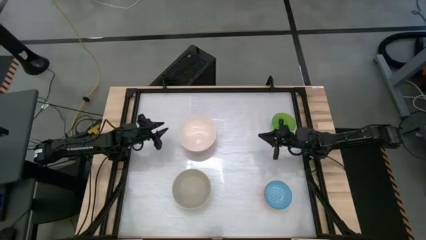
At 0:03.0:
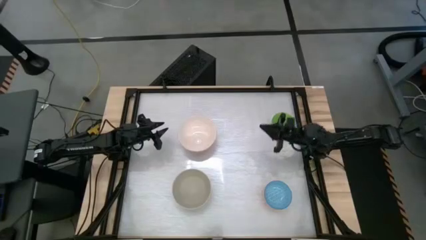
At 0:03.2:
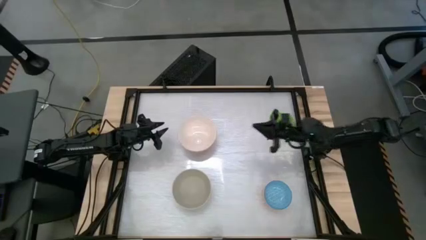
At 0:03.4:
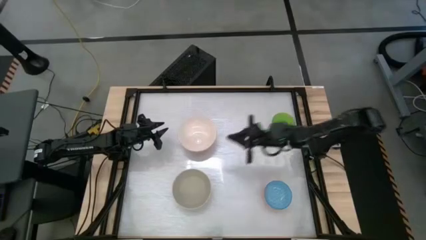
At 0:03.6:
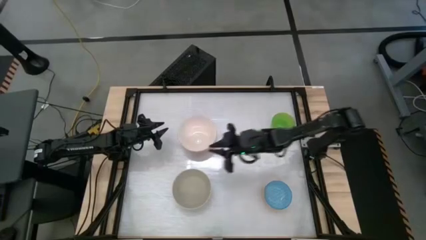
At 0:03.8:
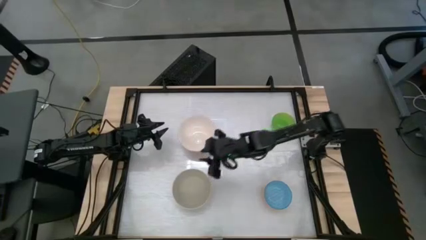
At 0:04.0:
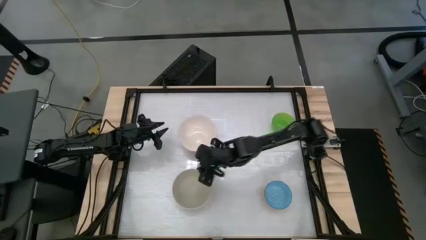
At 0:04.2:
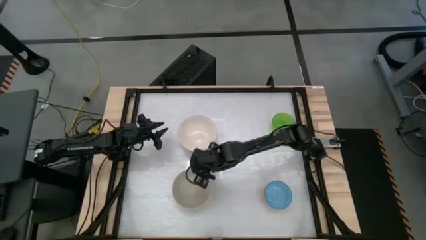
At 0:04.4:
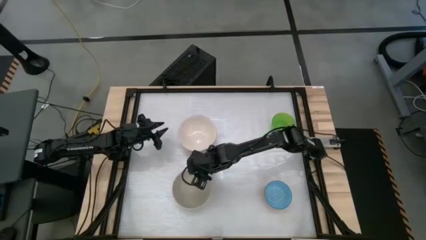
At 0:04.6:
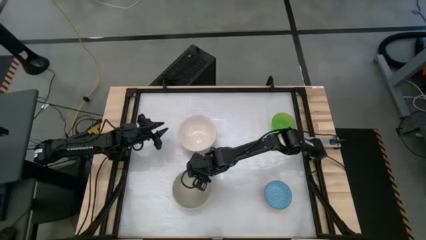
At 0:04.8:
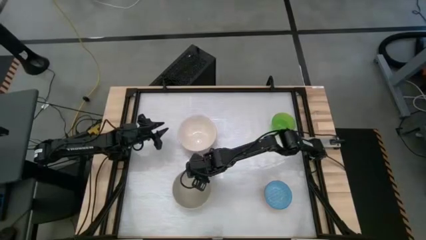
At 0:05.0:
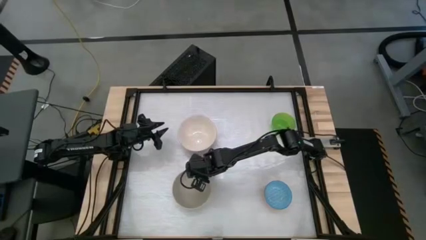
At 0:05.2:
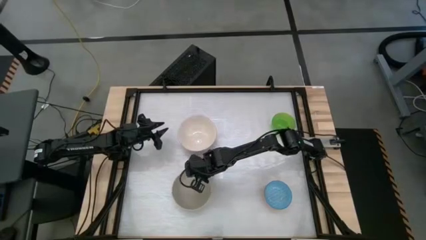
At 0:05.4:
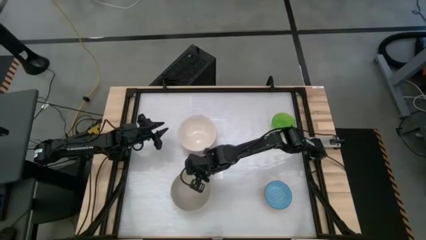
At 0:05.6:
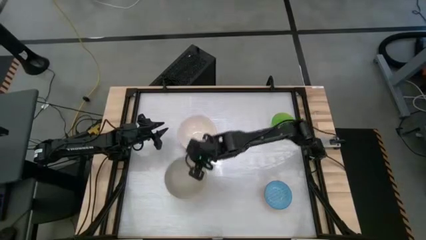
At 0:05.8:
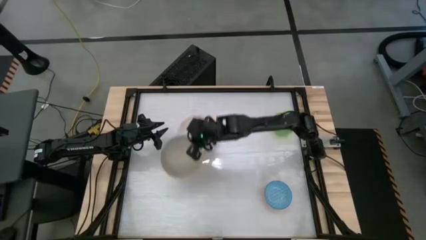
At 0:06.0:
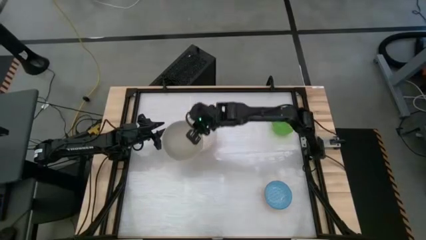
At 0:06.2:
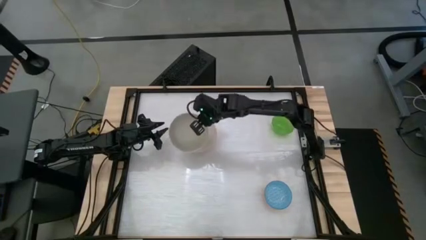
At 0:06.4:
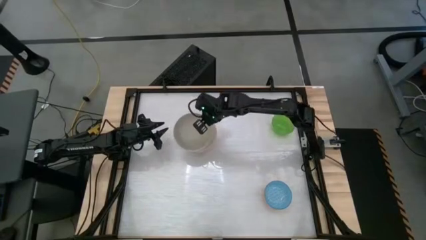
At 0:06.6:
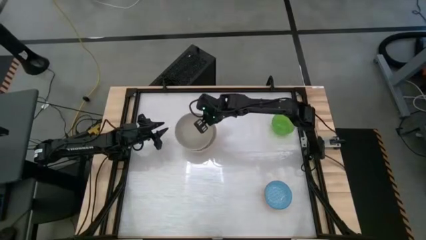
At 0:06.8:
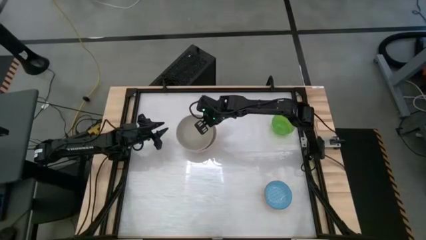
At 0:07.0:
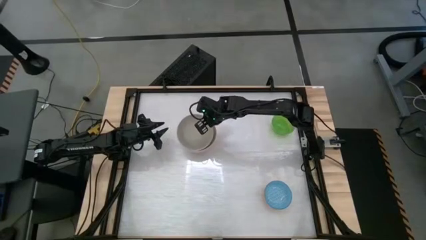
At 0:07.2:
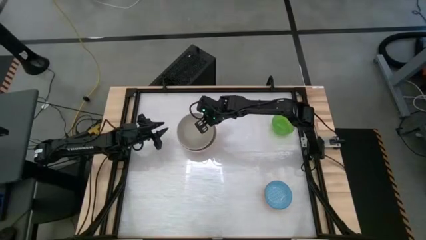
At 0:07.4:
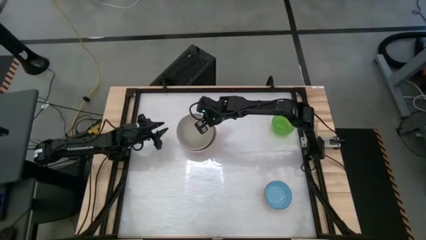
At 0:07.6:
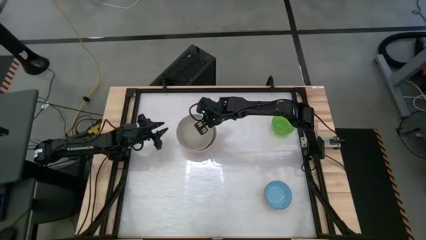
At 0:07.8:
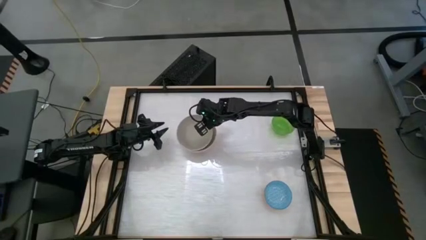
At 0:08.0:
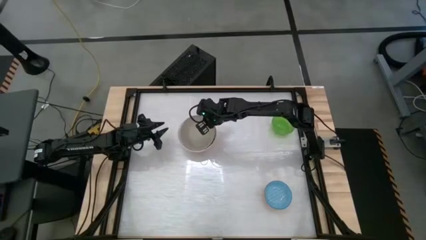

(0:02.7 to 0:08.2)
Stack the gray bowl on top of the pink bowl

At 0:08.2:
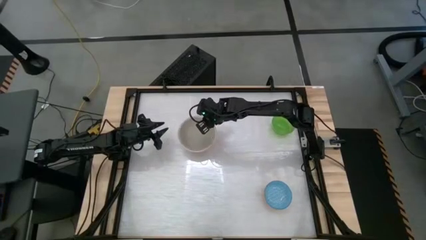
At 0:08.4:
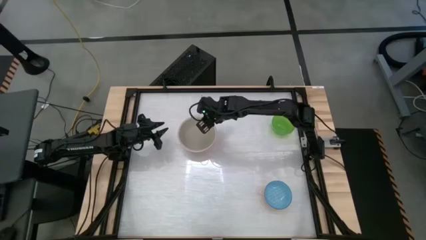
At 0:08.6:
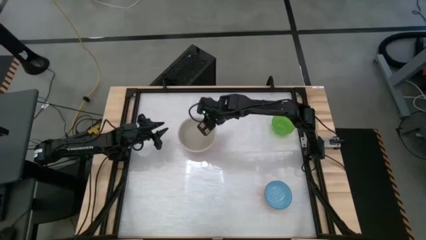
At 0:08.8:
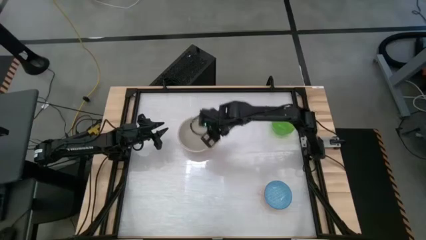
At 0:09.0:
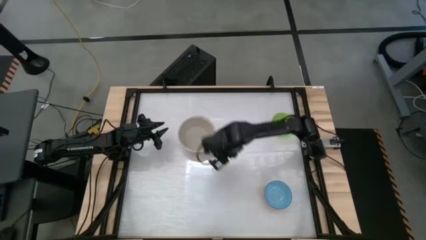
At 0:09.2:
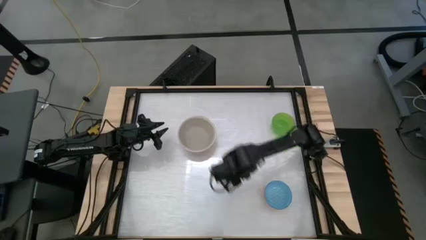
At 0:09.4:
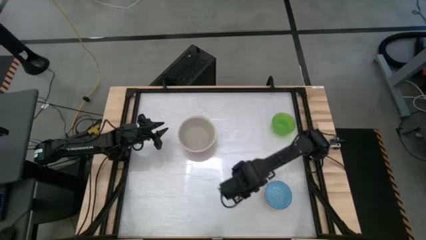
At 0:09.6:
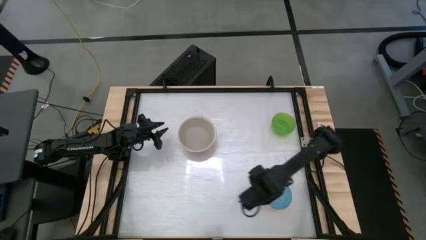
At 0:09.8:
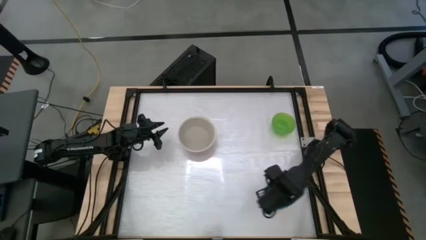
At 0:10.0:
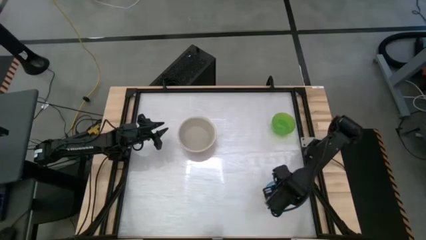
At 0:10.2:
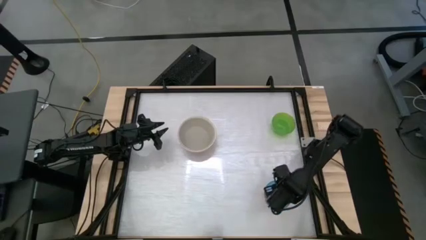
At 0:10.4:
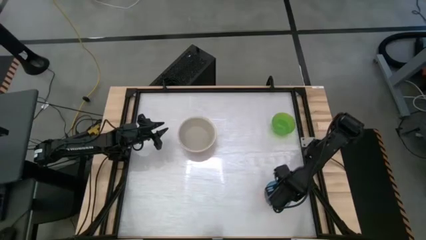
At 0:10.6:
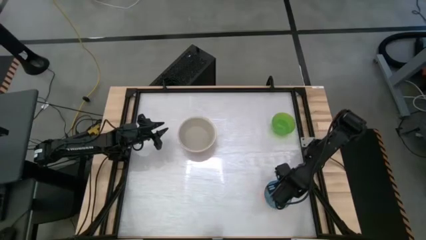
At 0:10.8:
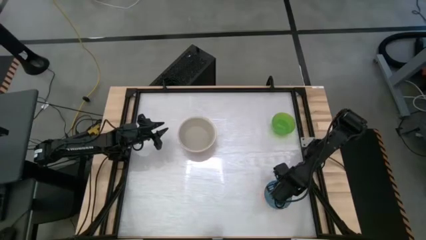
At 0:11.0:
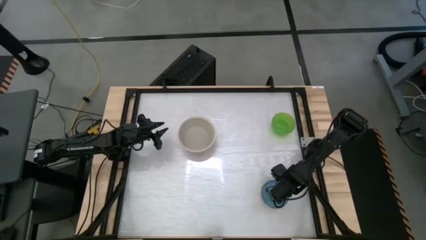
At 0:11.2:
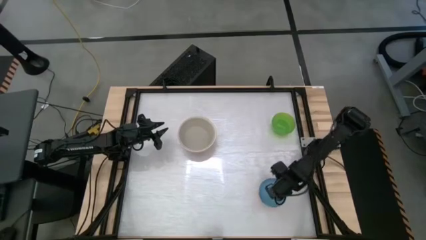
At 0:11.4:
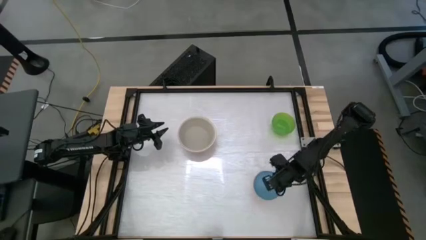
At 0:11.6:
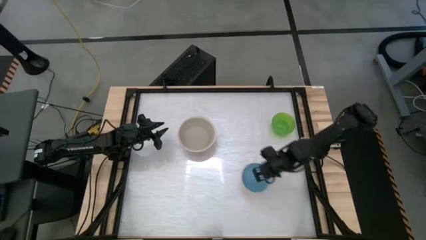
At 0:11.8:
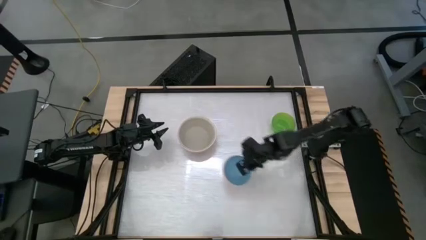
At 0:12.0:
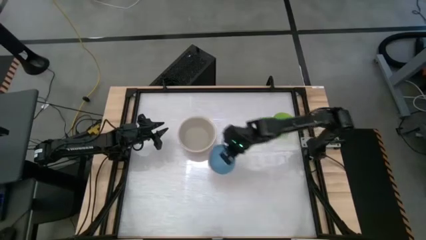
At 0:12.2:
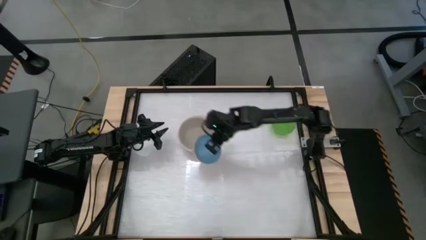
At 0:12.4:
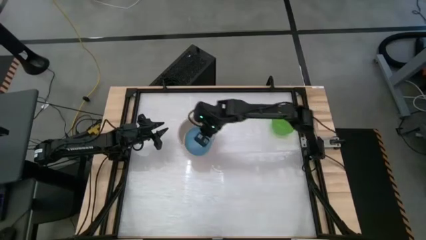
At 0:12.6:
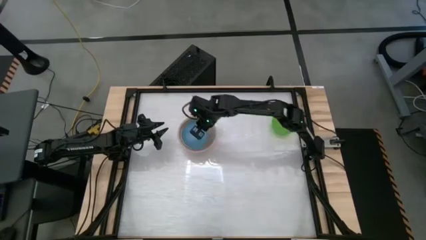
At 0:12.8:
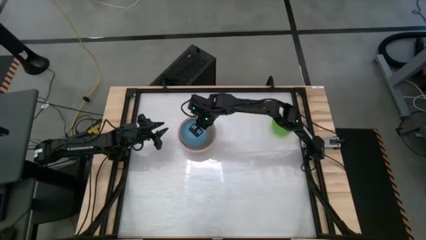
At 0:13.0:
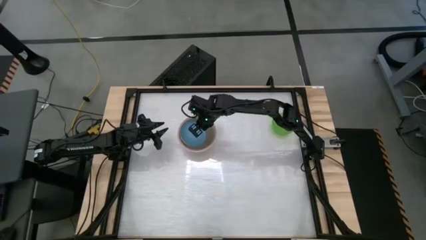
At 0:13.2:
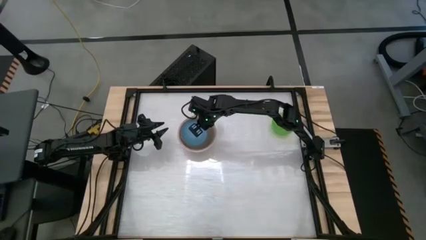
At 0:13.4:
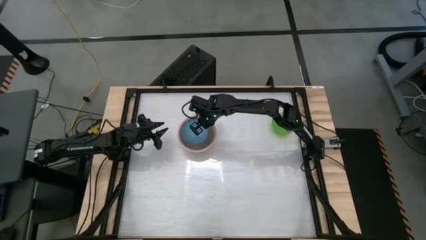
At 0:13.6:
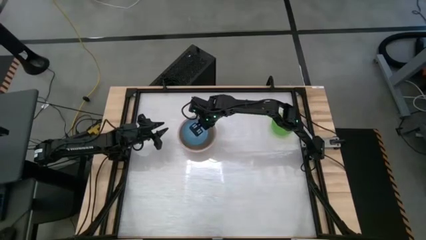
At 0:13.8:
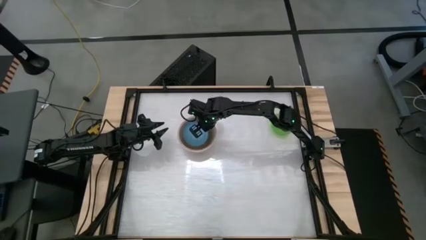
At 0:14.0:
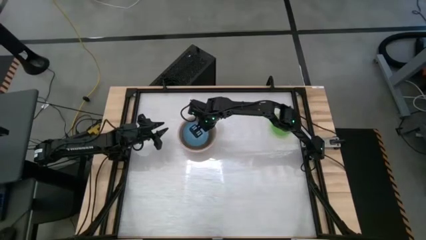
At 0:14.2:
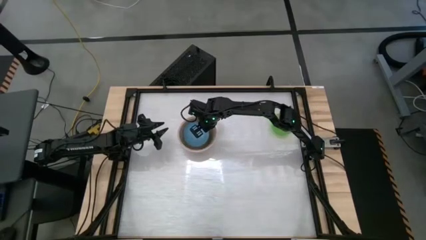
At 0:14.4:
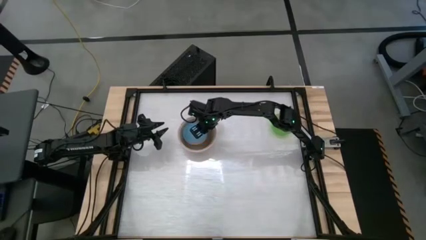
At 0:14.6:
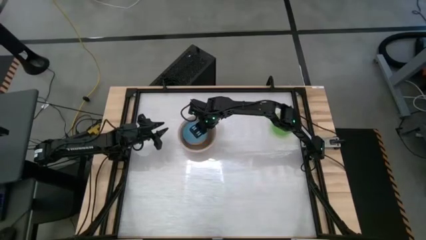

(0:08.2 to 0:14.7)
Stack the blue patterned bowl on top of the gray bowl

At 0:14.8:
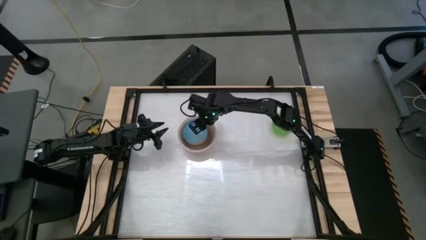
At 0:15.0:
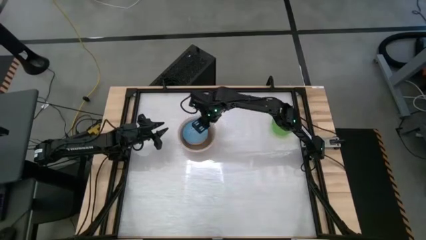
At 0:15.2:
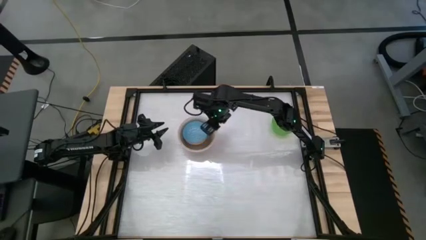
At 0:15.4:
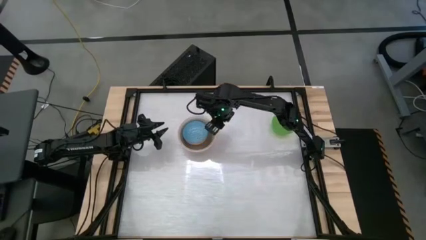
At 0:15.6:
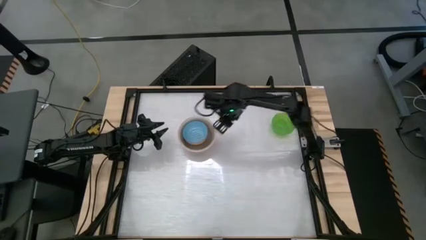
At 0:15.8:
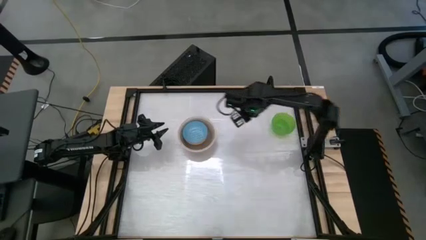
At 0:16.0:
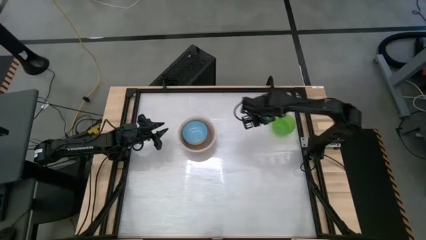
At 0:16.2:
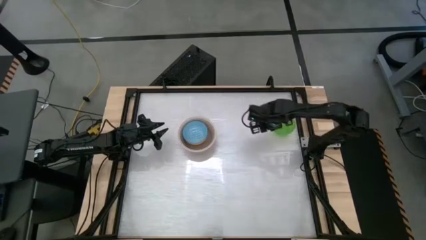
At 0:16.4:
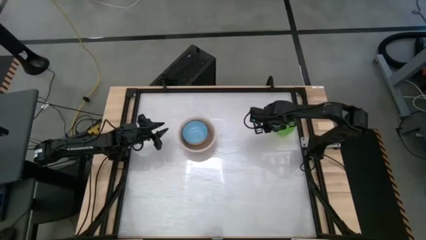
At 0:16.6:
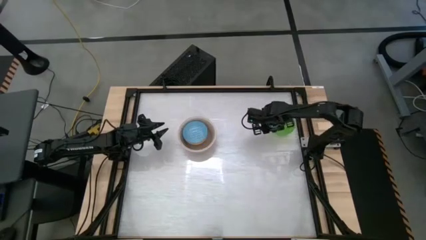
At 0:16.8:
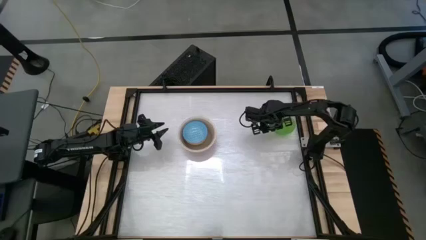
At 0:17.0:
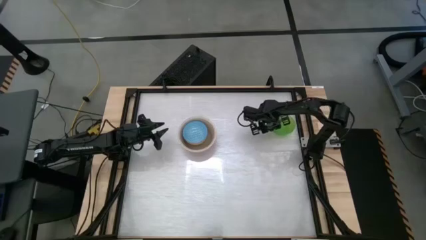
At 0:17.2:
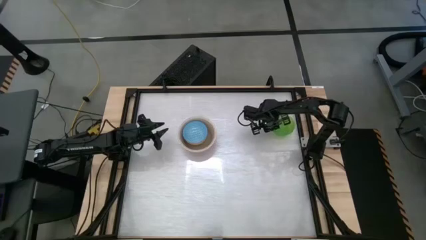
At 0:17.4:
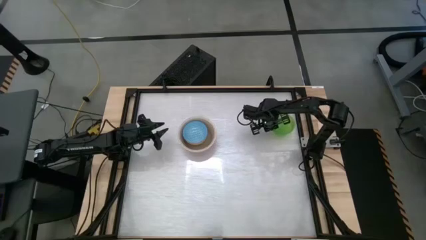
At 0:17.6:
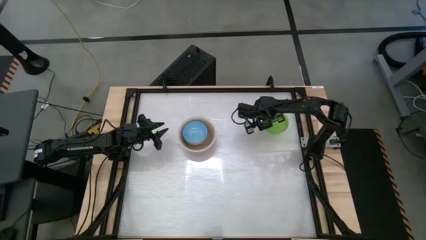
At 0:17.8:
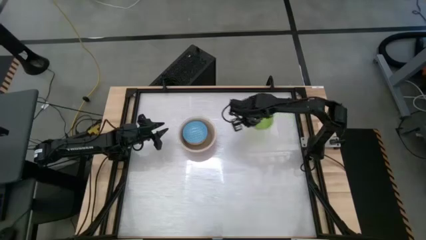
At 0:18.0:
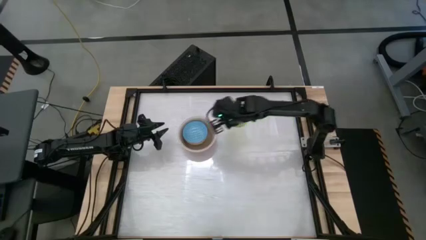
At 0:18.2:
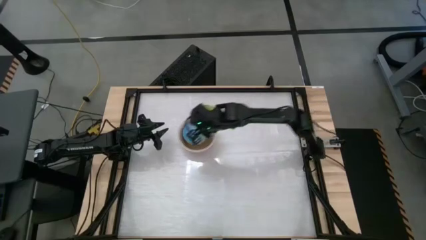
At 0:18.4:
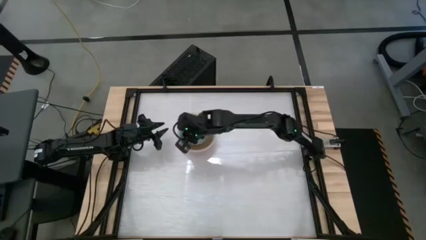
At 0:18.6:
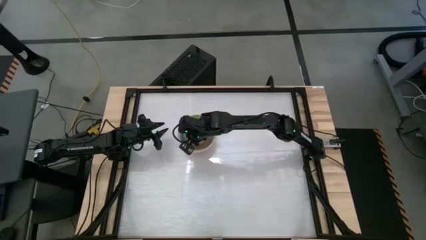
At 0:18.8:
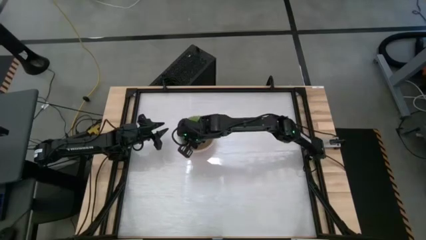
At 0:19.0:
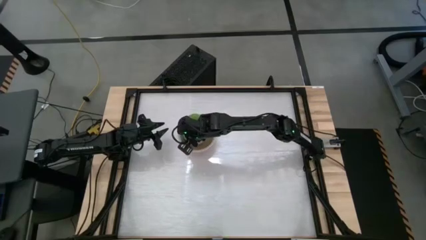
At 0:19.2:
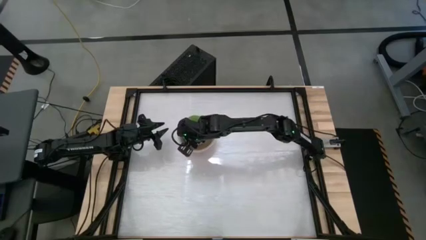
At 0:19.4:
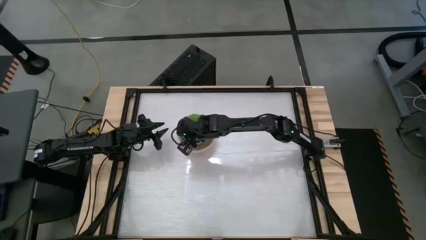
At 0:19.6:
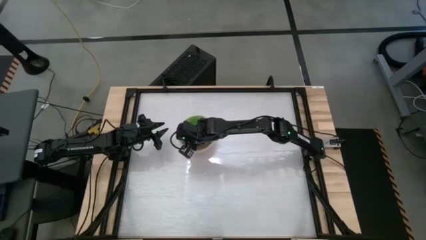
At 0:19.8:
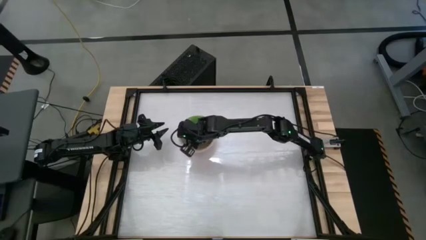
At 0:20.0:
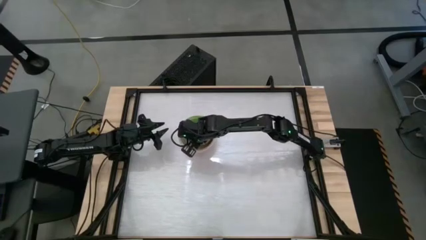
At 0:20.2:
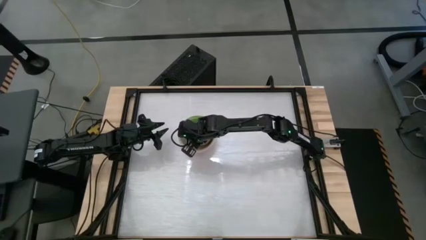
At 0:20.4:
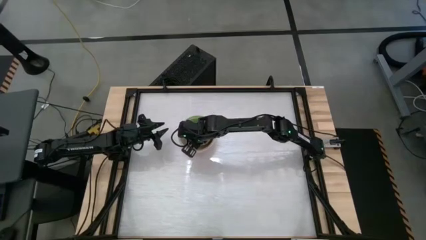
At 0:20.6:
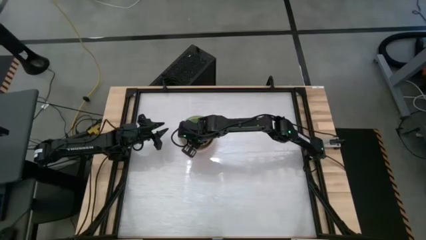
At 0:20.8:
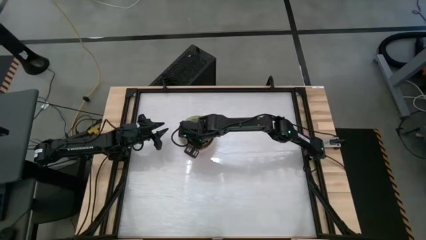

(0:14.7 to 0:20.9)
Stack the green bowl on top of the blue patterned bowl
